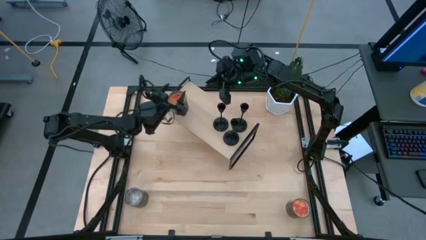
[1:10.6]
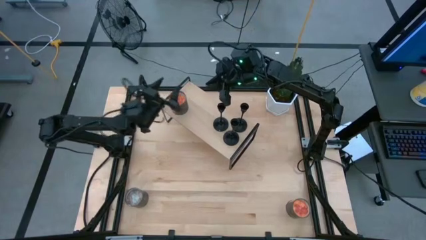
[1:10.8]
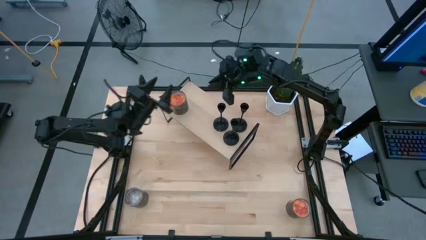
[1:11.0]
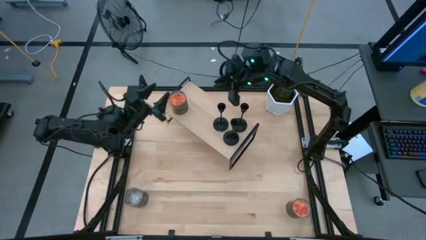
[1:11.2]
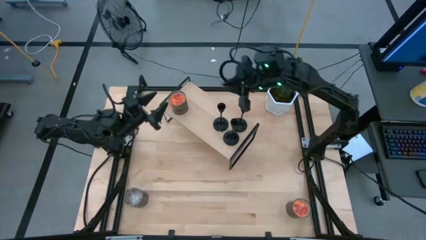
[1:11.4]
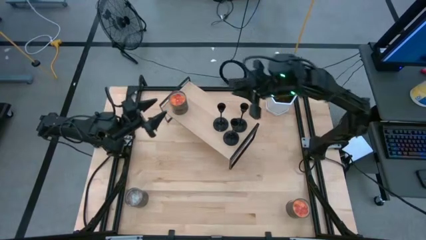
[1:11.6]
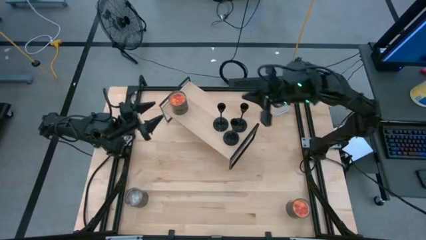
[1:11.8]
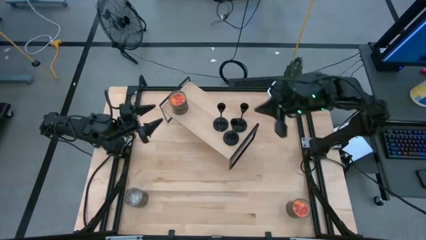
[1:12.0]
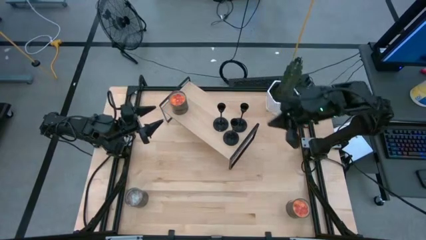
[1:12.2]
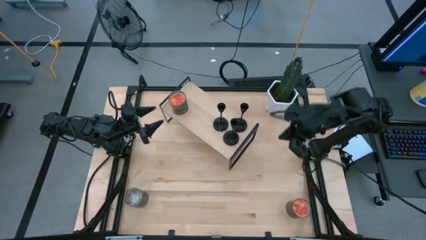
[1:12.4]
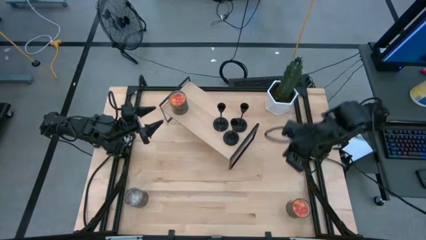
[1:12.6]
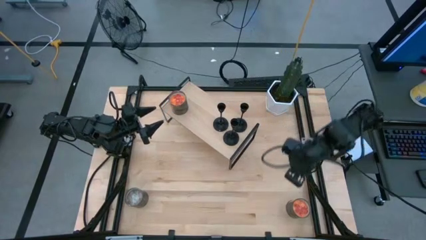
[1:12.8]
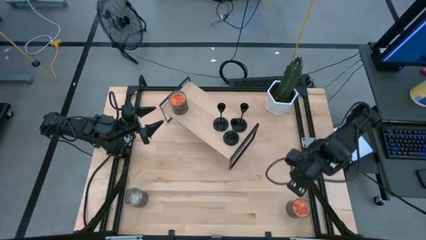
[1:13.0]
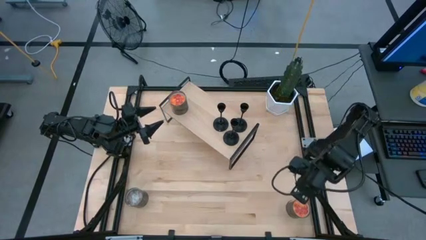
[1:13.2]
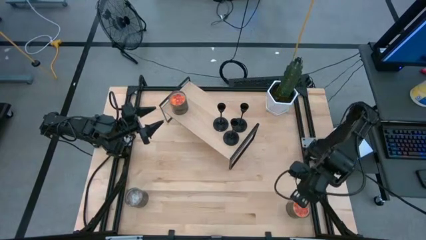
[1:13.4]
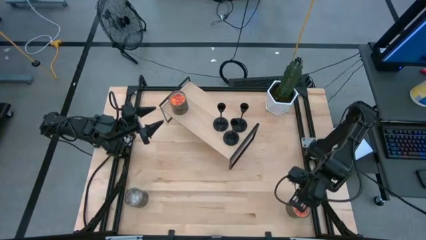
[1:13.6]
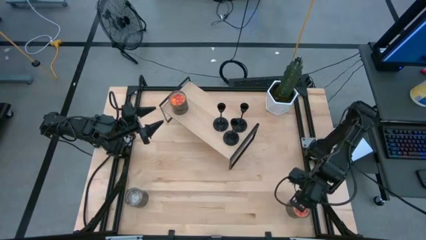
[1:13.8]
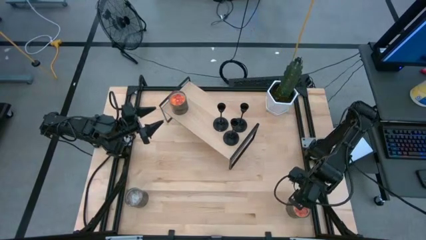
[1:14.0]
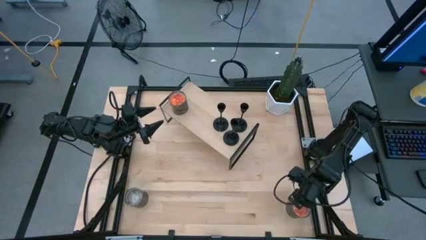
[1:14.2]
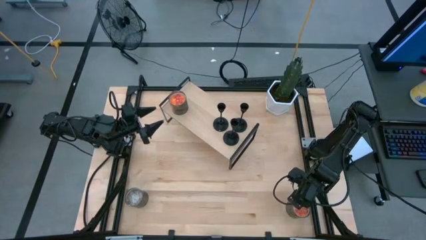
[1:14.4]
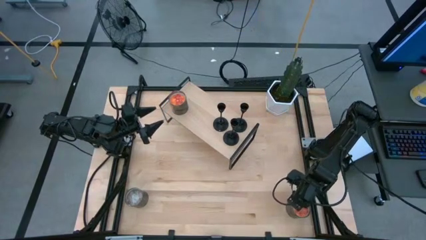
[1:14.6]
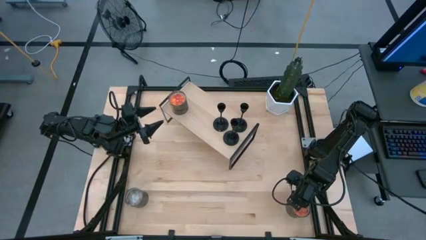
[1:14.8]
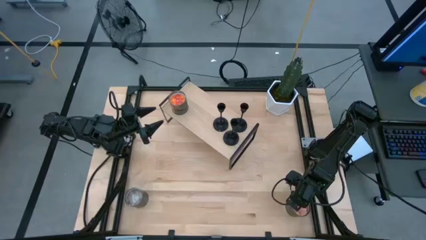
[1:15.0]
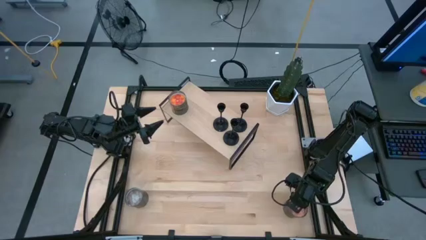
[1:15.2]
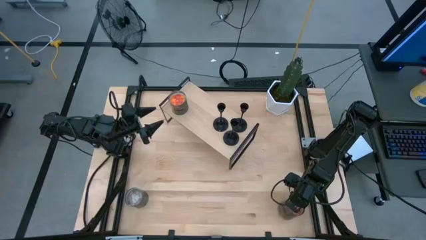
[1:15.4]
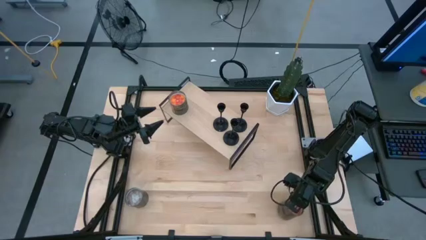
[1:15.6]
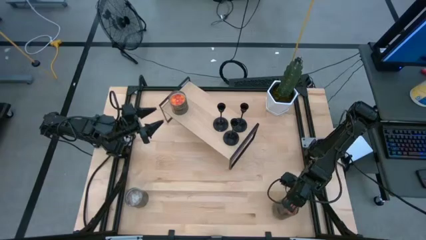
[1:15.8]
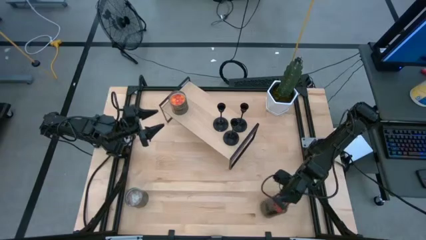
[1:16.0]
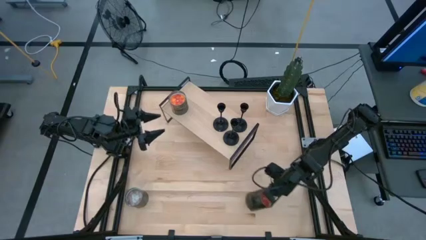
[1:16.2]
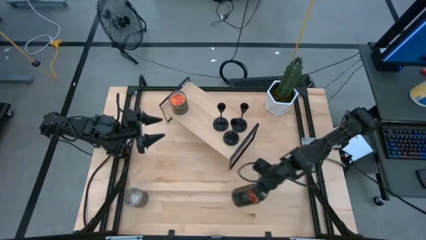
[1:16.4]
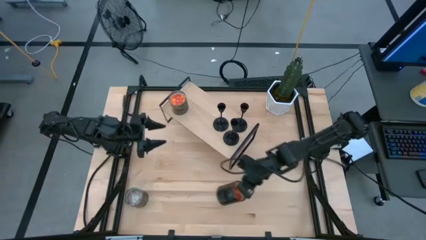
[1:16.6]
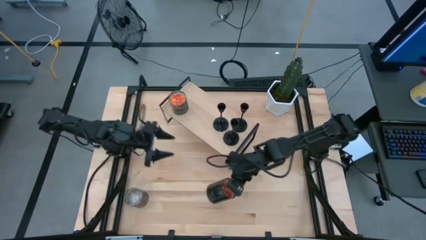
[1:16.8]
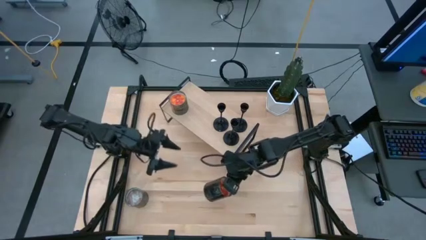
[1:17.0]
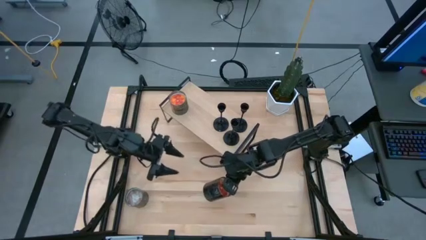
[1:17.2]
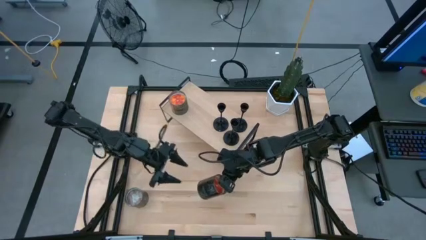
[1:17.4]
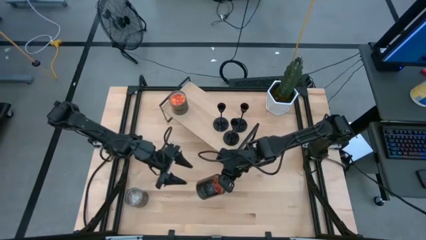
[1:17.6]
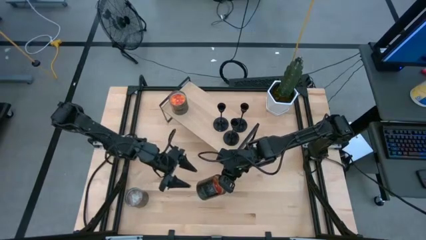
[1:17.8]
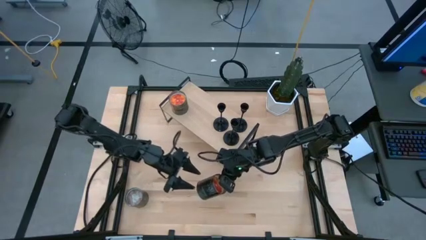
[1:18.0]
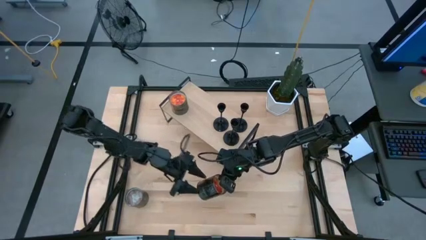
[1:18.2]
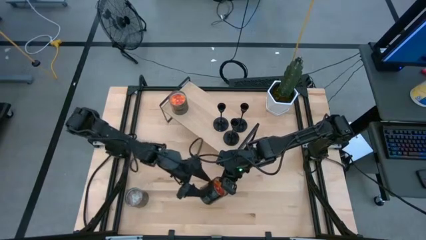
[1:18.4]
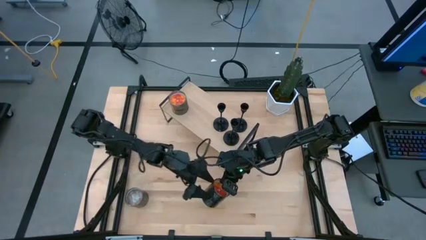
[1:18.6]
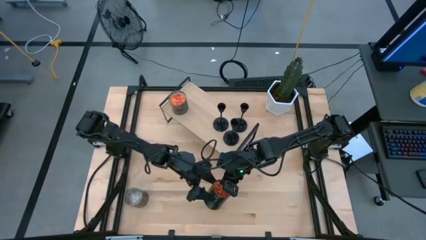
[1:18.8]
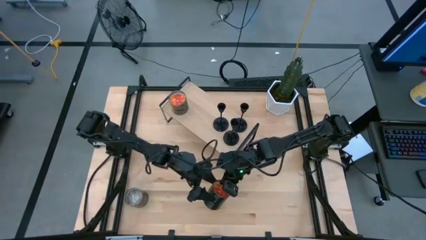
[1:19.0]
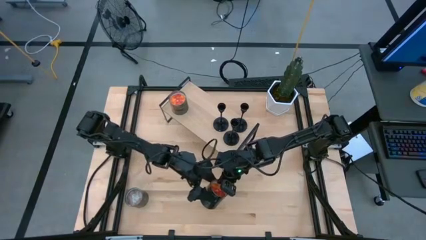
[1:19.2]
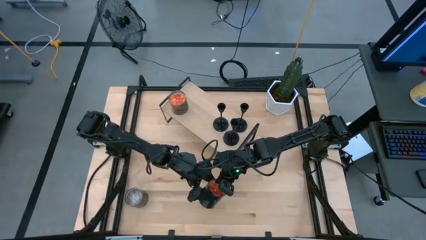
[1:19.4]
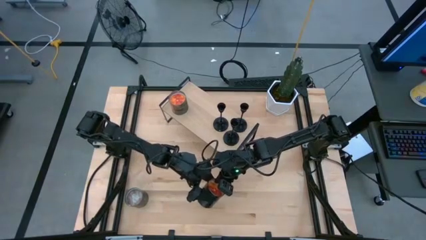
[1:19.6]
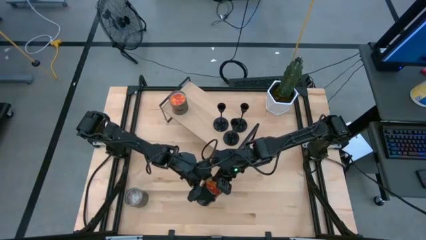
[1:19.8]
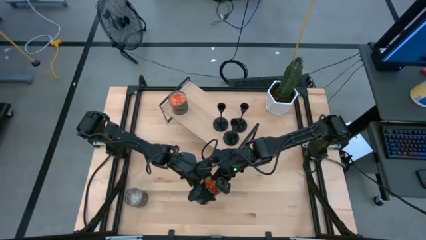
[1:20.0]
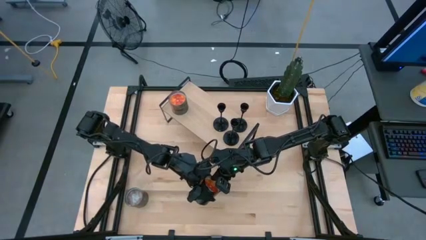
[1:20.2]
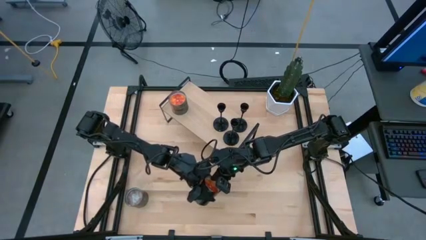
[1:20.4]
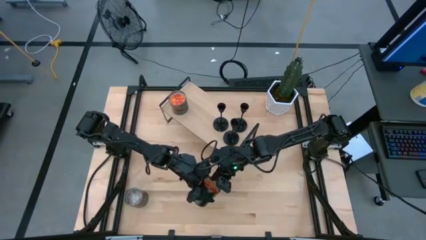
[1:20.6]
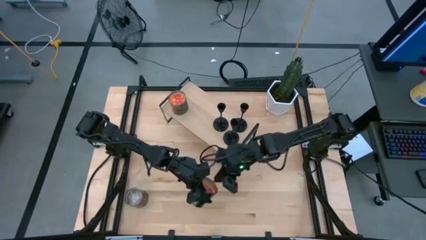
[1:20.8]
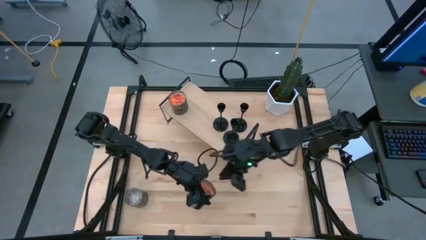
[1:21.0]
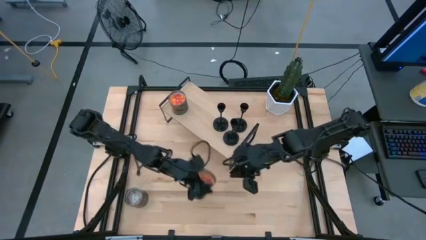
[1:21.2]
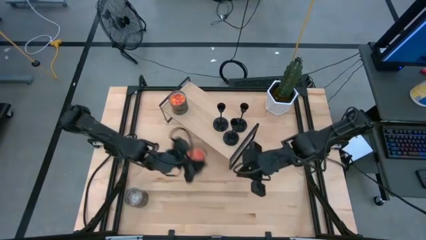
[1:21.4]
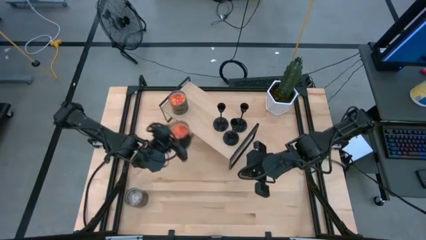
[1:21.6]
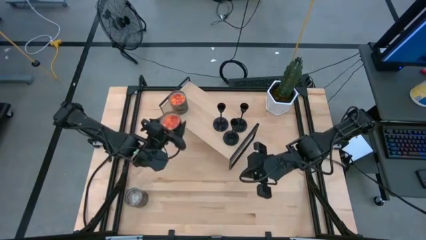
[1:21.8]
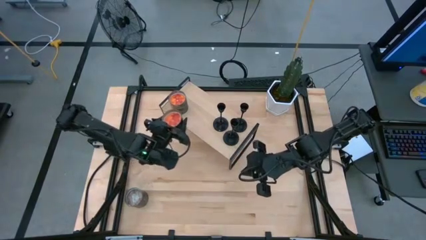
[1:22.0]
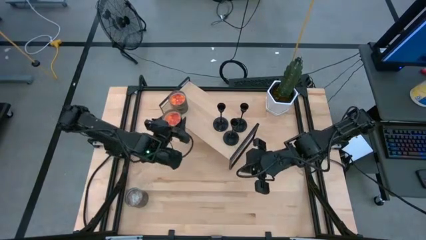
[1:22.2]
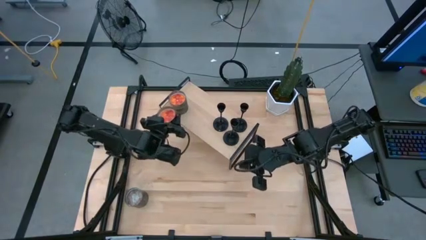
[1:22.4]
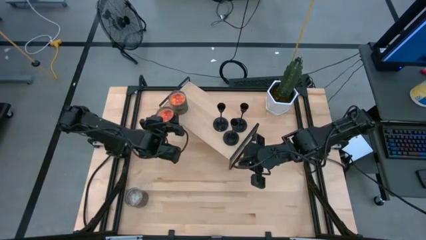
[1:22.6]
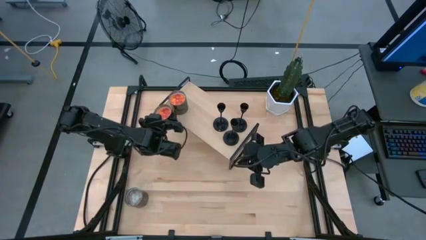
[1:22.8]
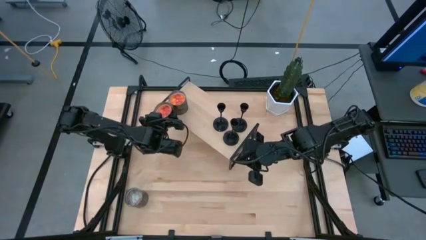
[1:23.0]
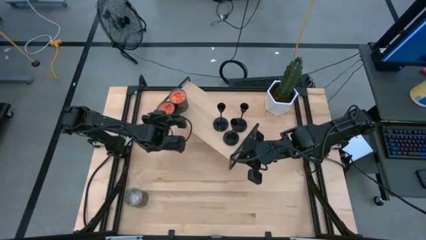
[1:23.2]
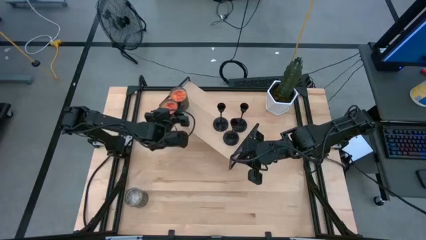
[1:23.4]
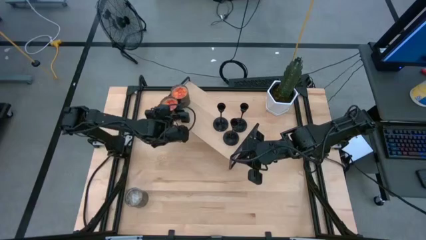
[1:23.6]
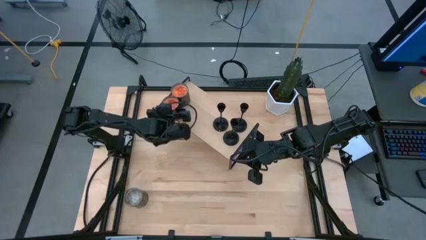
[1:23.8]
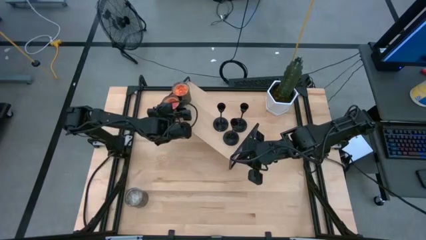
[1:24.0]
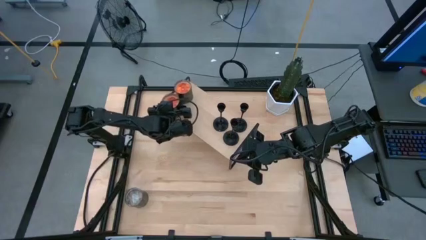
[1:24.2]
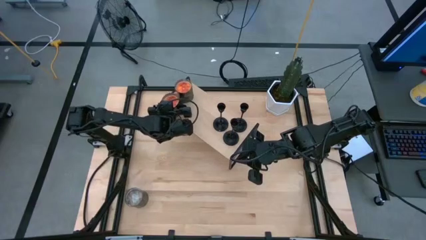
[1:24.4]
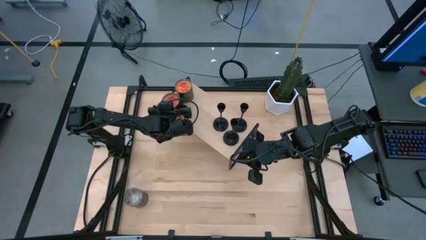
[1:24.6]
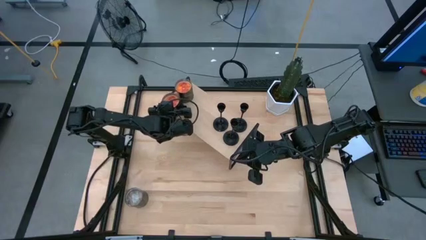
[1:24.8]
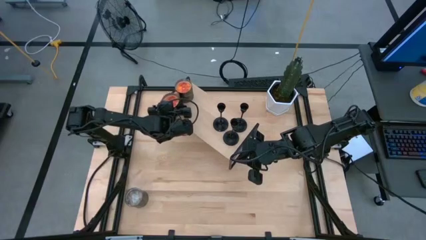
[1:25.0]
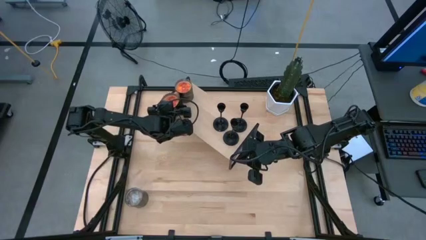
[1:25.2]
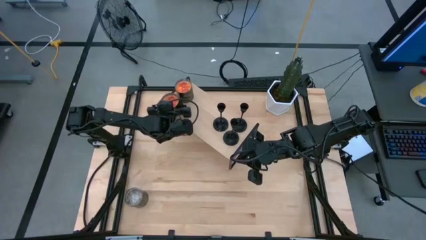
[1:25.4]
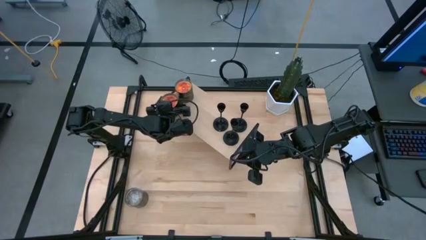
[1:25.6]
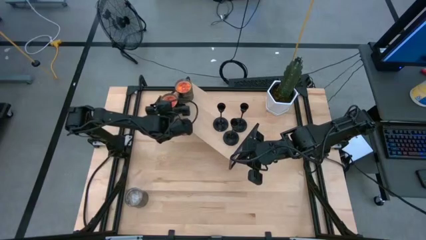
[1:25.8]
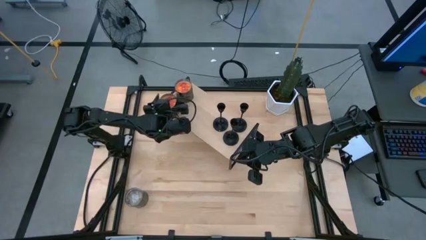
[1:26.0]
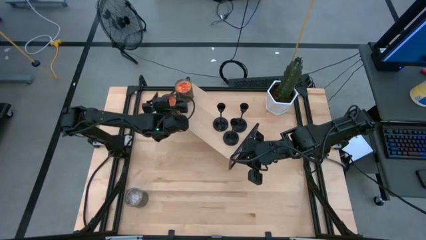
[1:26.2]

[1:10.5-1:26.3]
Task: Pick & Place candle stick holders
Put the orange scented candle on the shelf
